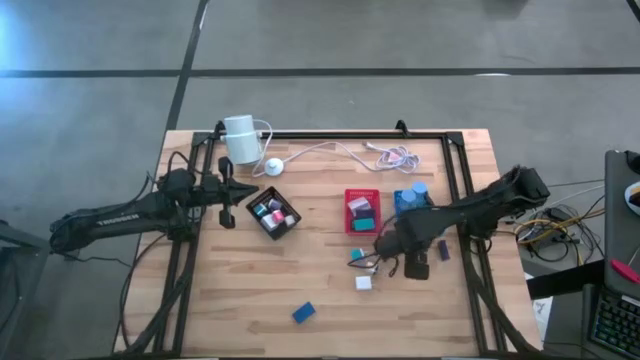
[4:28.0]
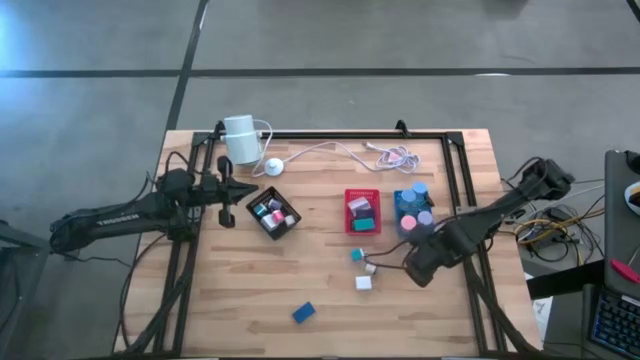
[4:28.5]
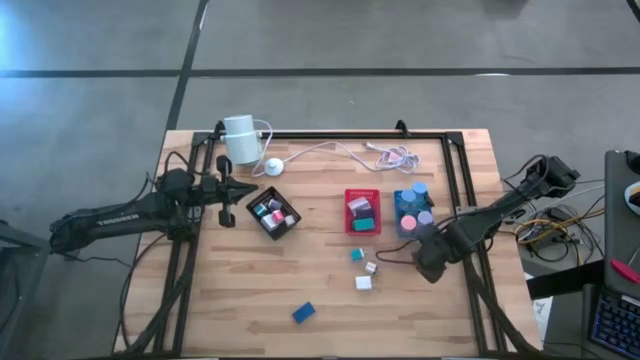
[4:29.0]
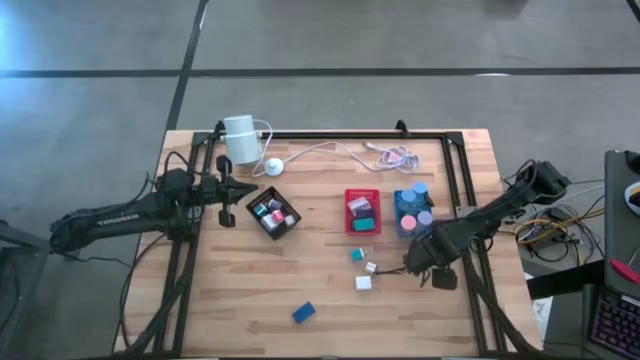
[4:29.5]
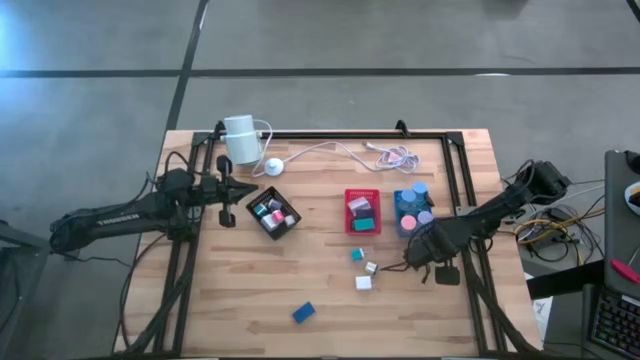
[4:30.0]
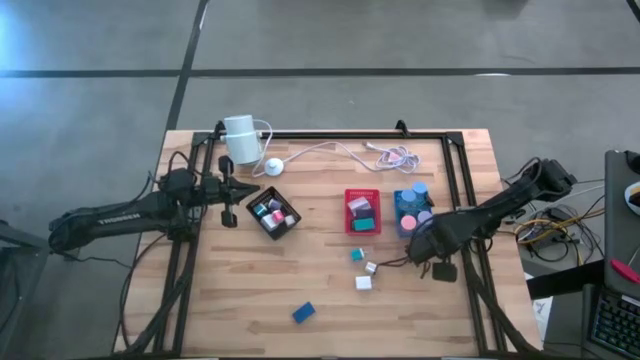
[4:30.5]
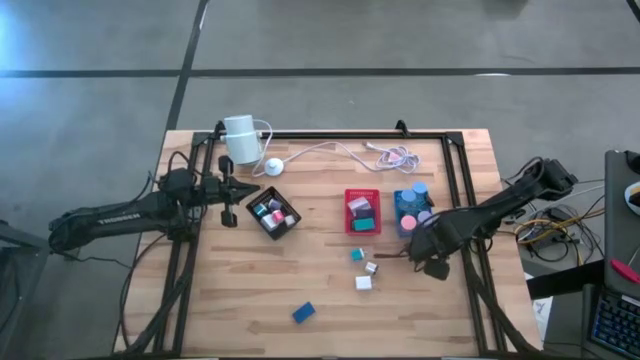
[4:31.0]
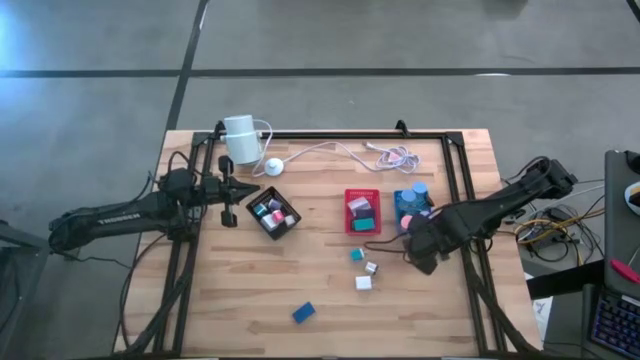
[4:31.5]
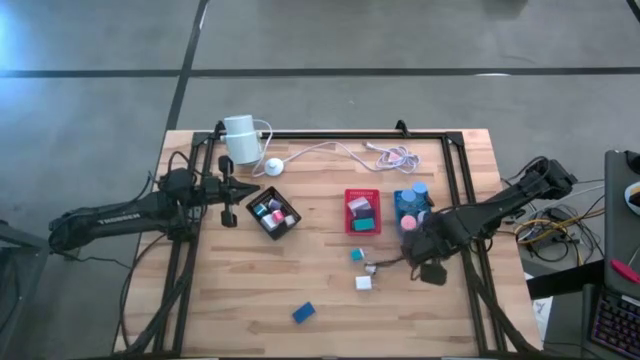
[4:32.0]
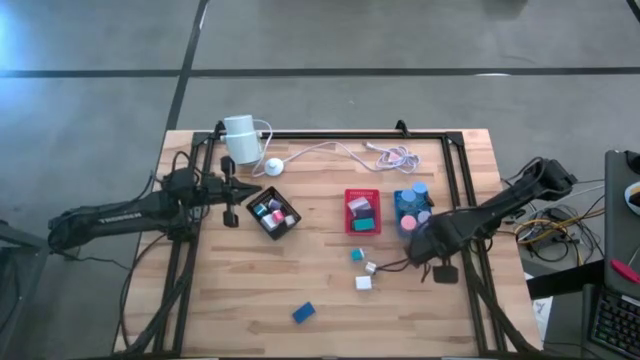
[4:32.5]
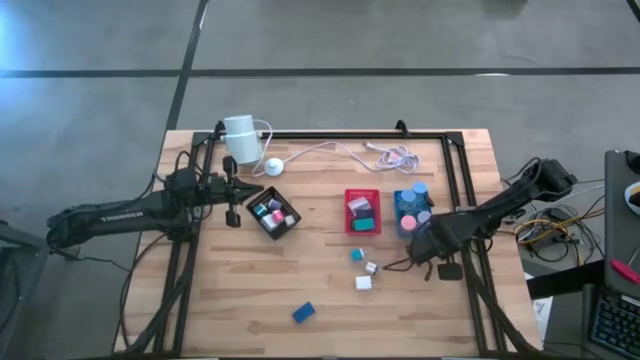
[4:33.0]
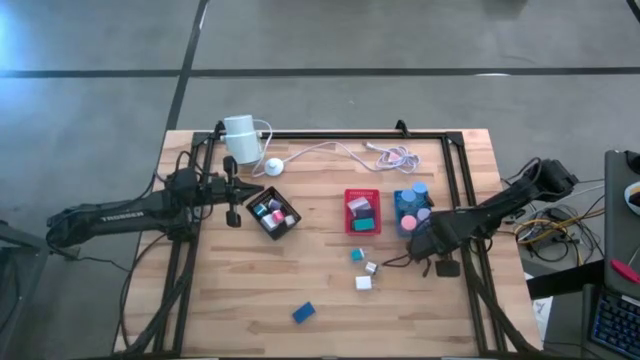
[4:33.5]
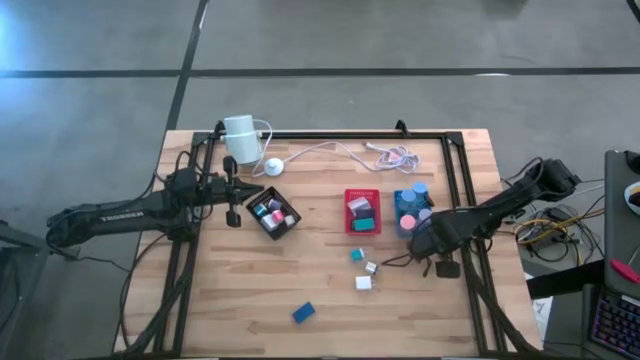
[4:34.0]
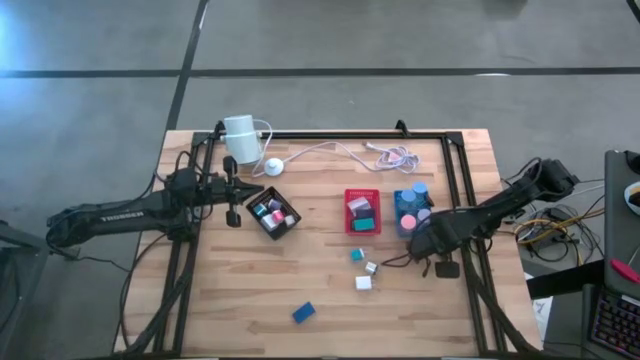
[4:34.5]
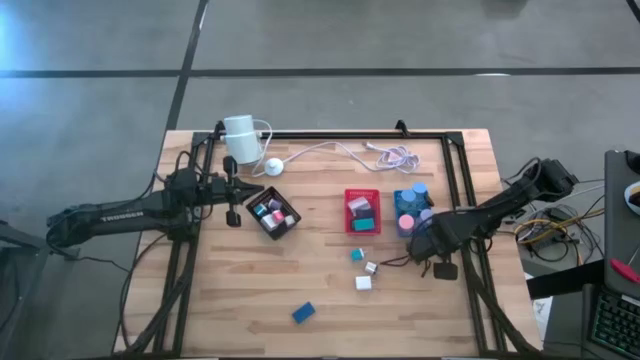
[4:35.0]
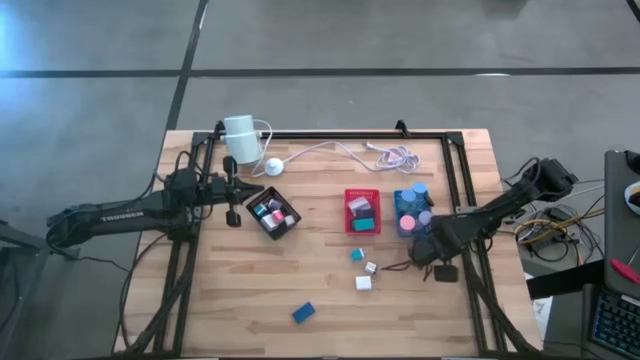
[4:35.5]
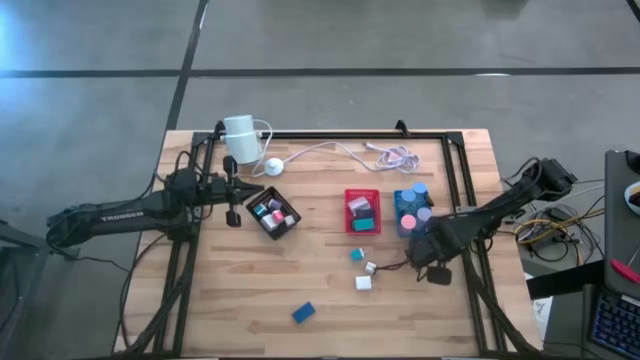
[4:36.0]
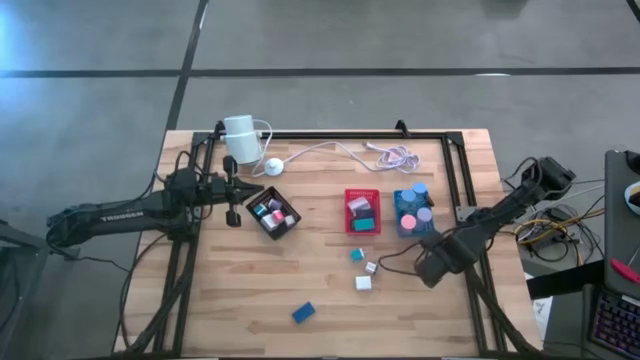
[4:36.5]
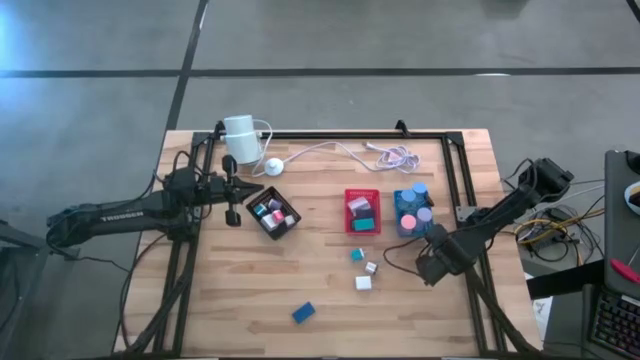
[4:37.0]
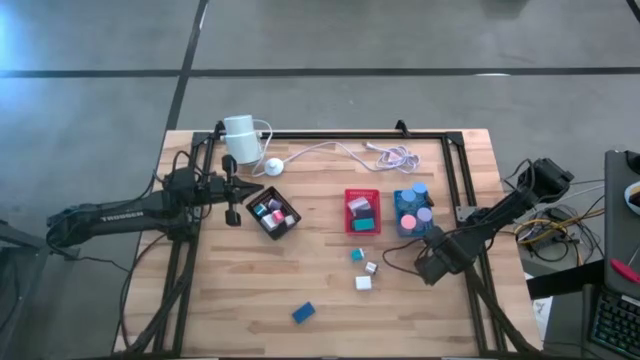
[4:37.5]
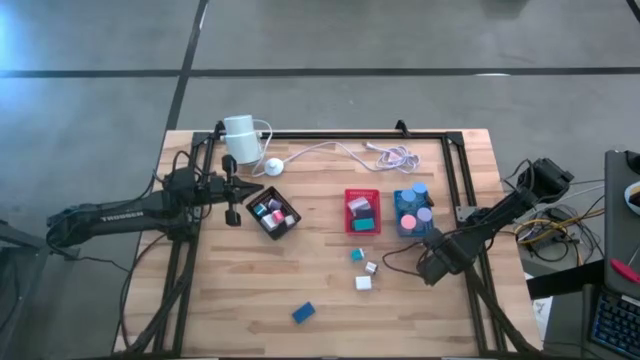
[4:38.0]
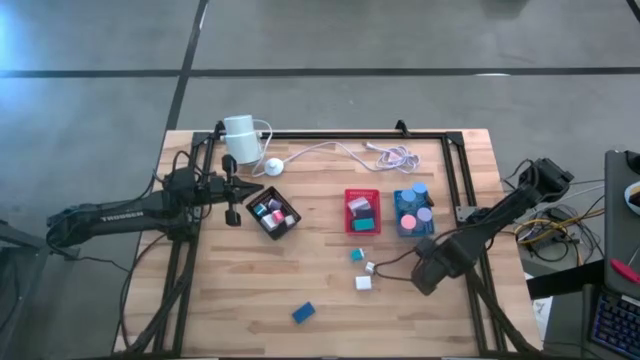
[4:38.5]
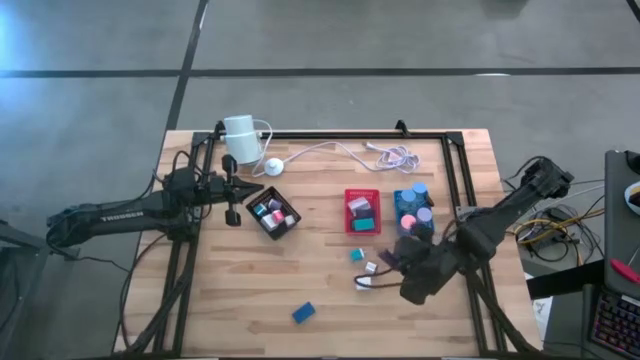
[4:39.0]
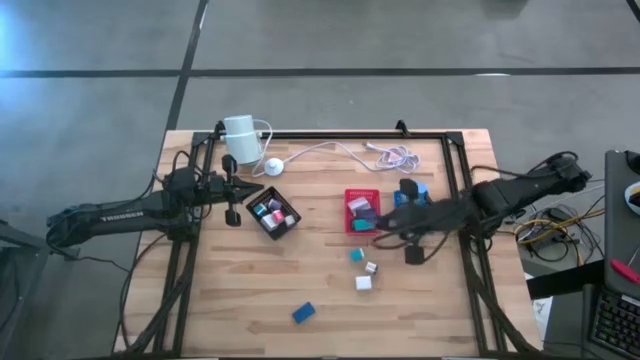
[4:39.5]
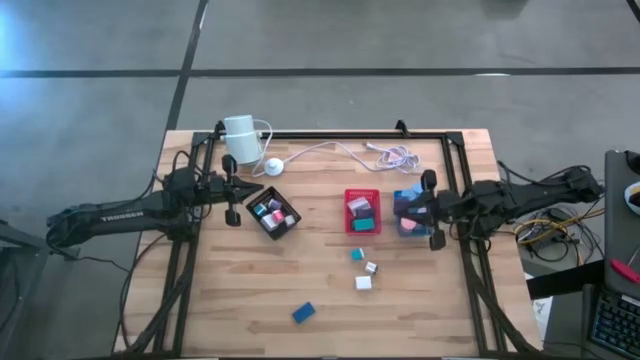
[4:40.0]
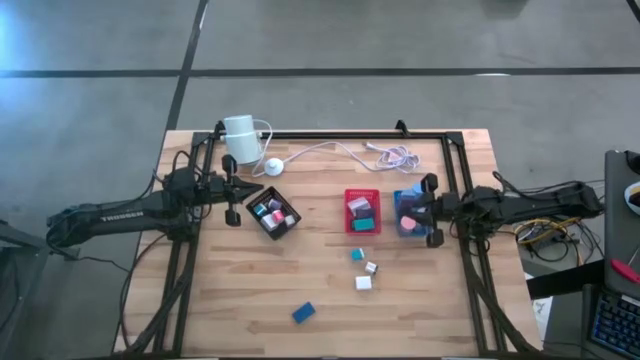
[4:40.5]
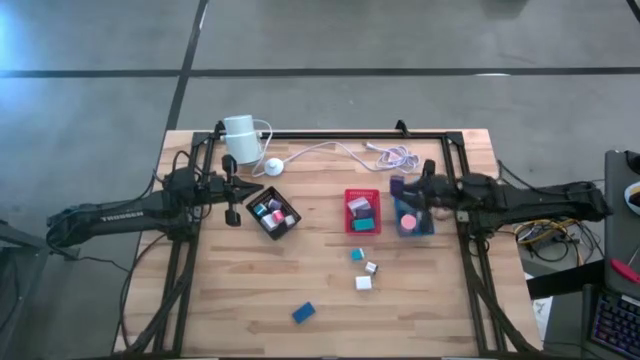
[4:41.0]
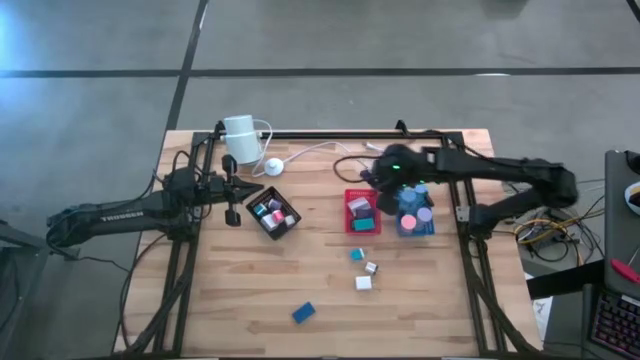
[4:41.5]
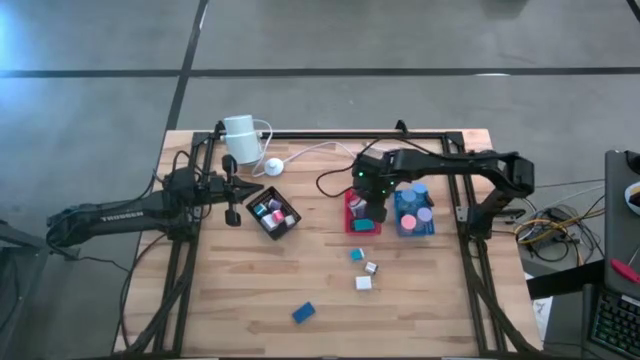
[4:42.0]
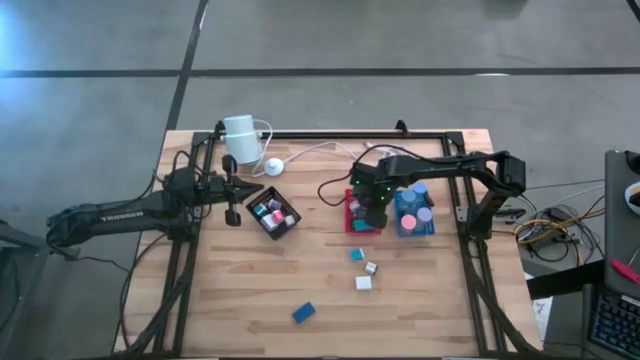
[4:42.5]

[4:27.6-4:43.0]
Task: Pick & Place Office items
Put the violet digital clock into the red bin

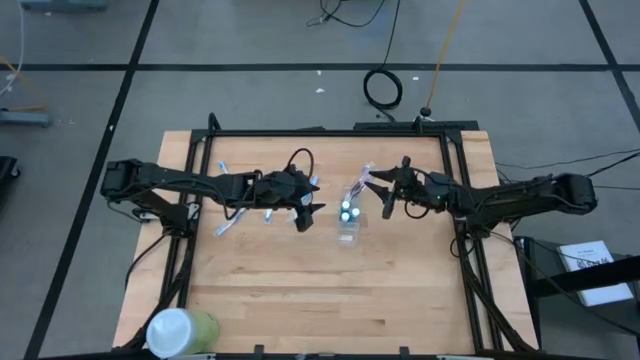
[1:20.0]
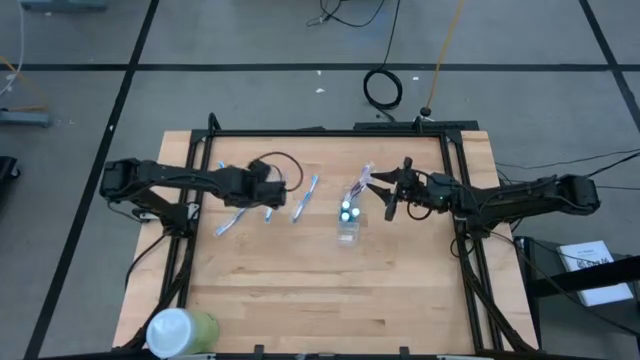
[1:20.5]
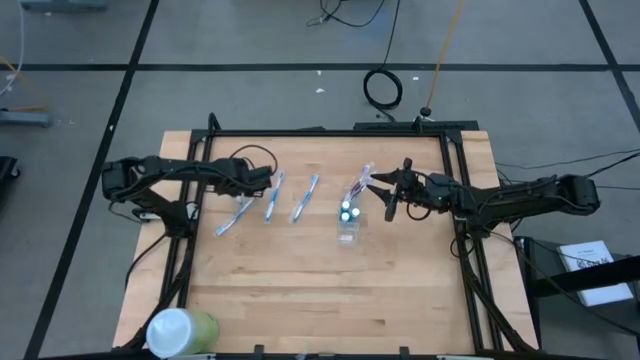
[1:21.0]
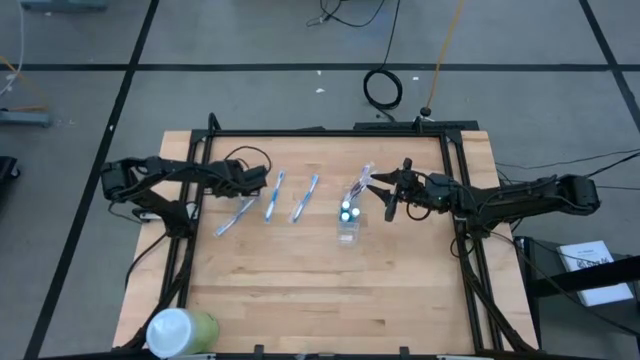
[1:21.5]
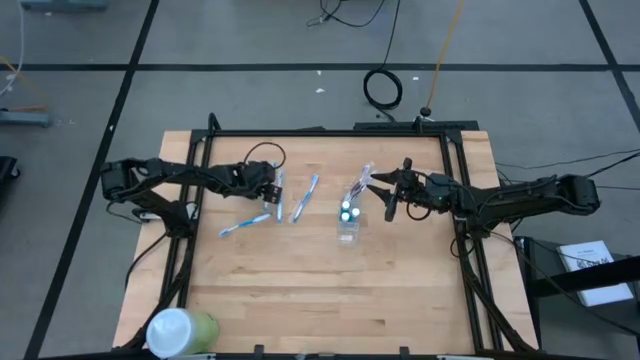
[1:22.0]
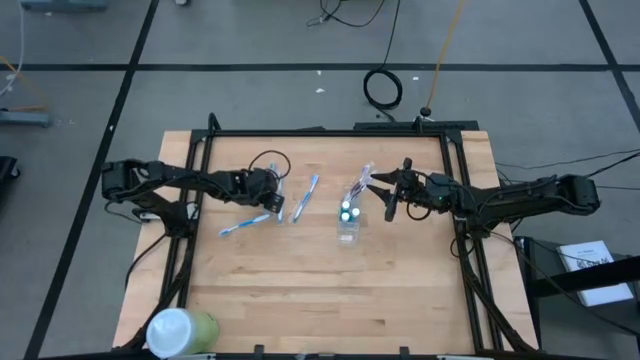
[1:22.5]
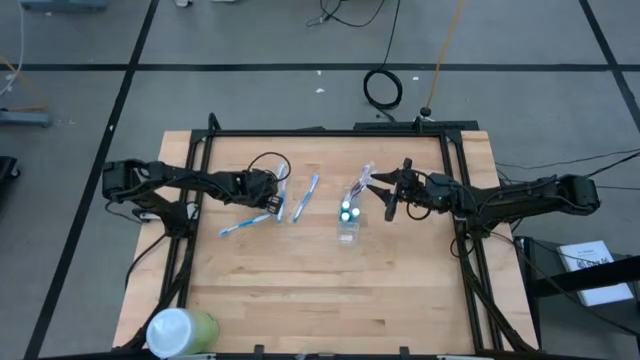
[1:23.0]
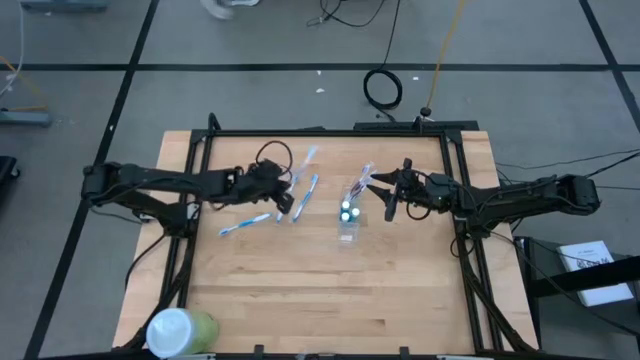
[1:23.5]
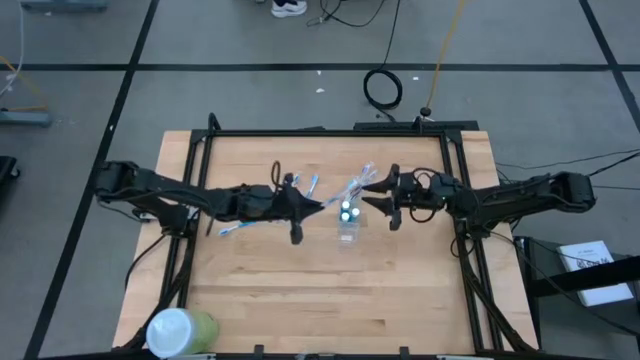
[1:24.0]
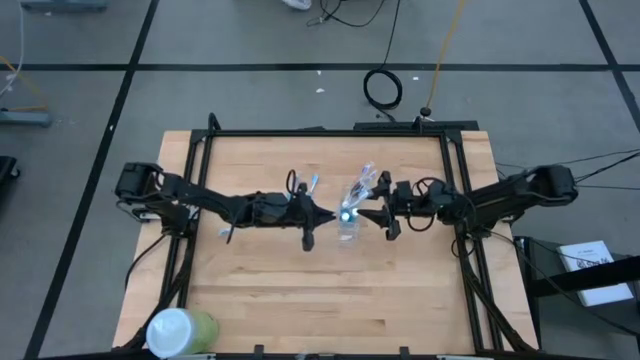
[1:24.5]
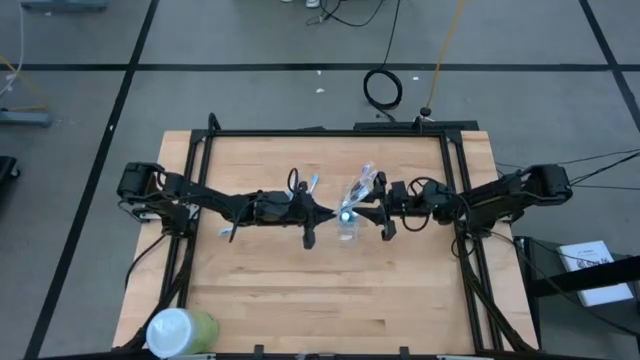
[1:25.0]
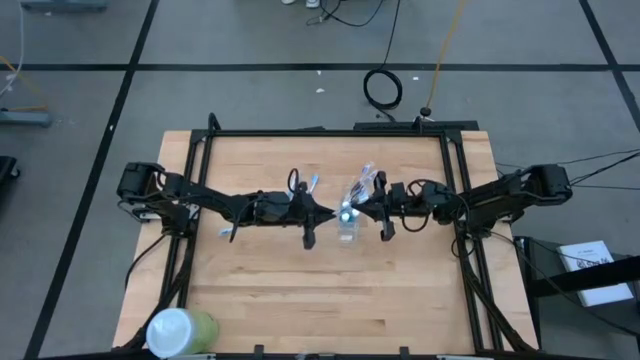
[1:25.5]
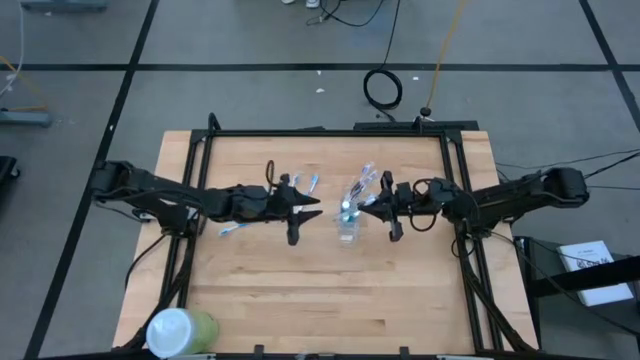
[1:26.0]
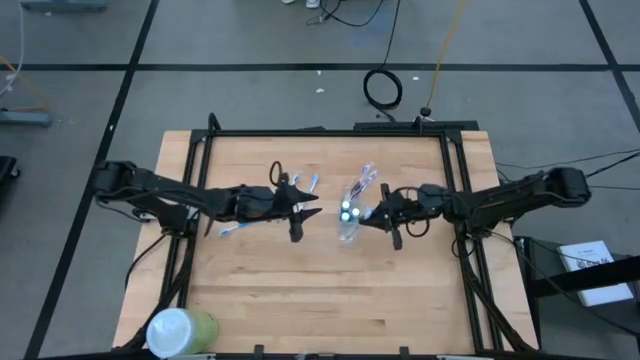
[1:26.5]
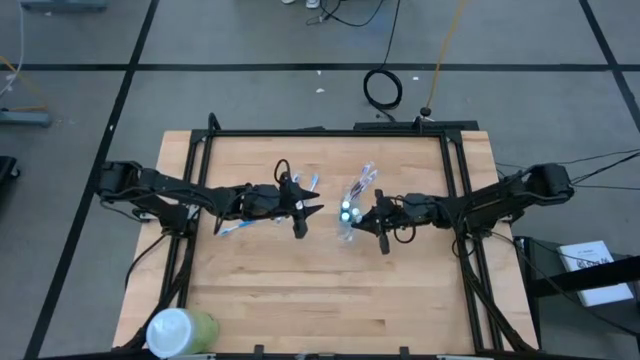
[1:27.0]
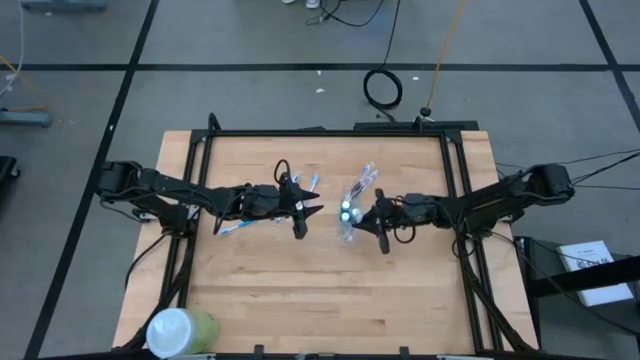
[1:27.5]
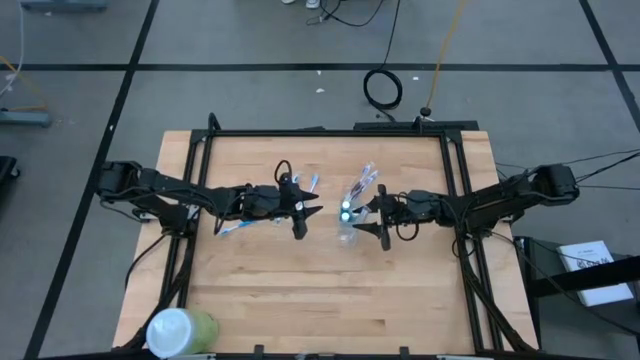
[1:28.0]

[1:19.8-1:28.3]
Task: Pick & Place toothbrushing station
Put the blue toothbrush into the transparent organizer
